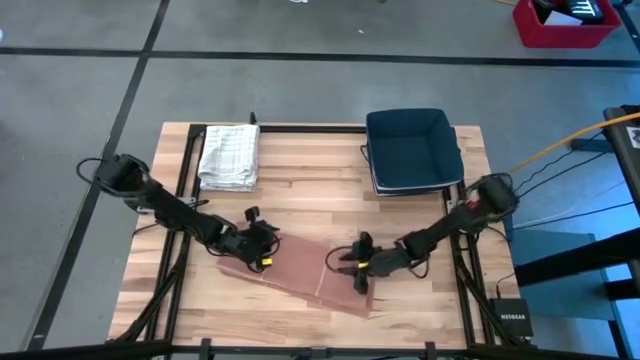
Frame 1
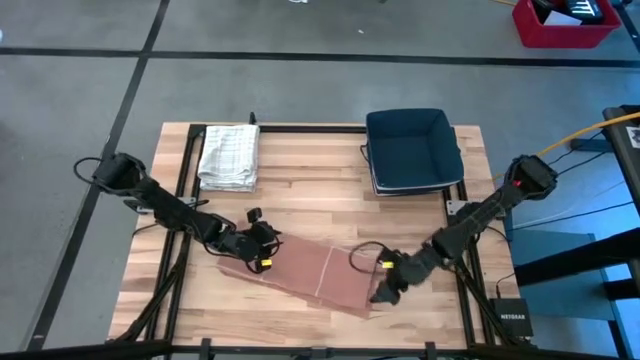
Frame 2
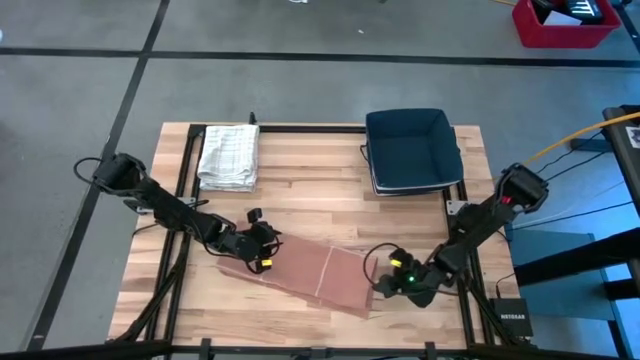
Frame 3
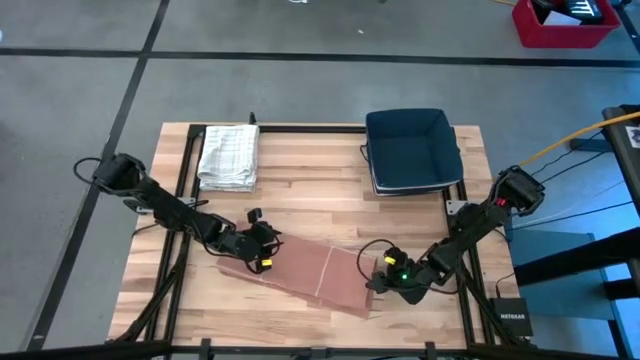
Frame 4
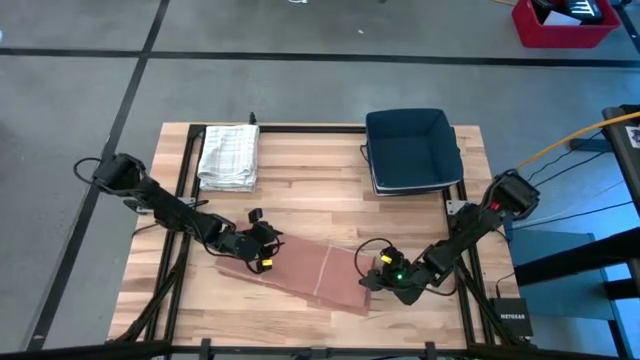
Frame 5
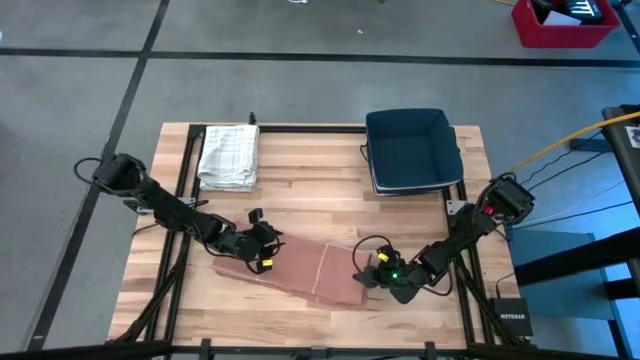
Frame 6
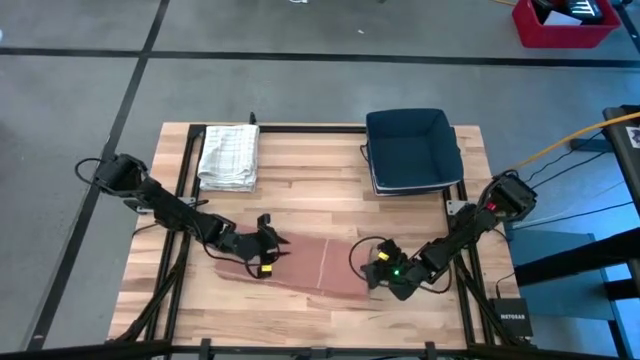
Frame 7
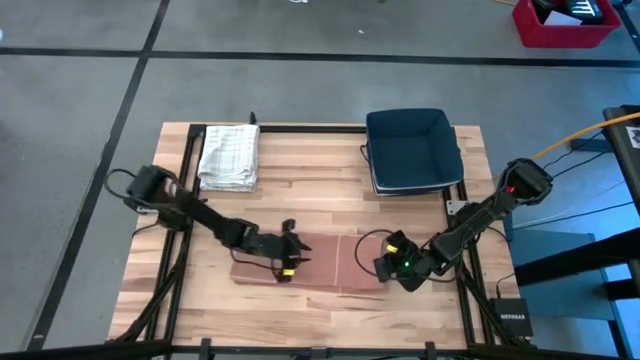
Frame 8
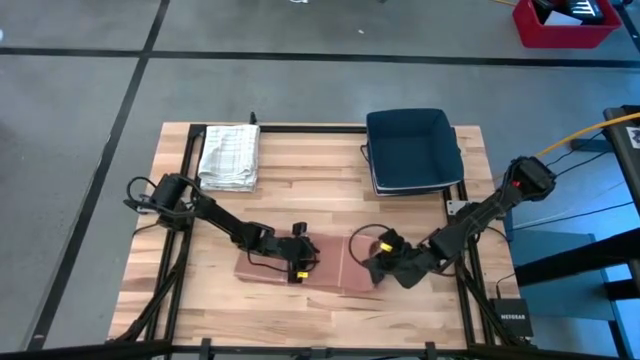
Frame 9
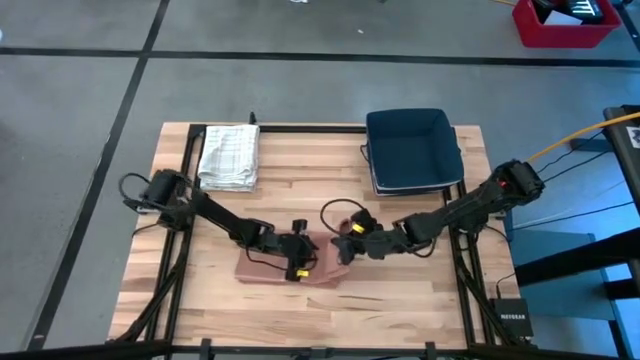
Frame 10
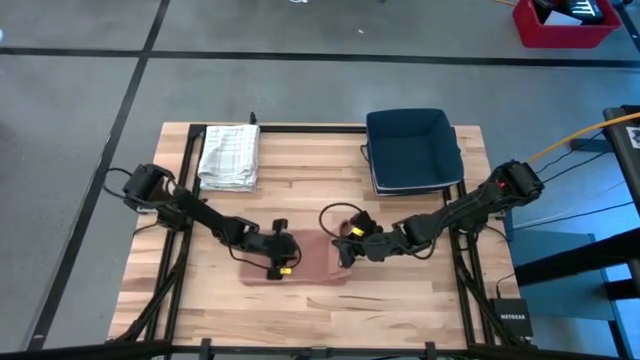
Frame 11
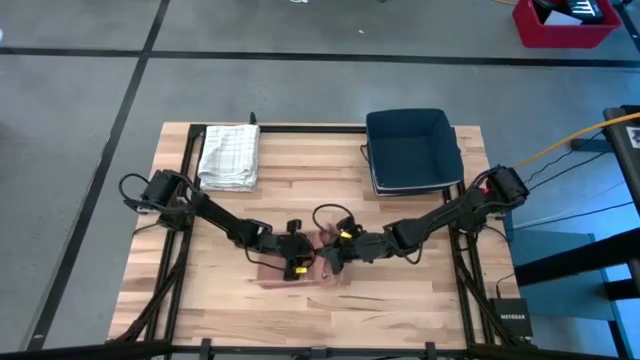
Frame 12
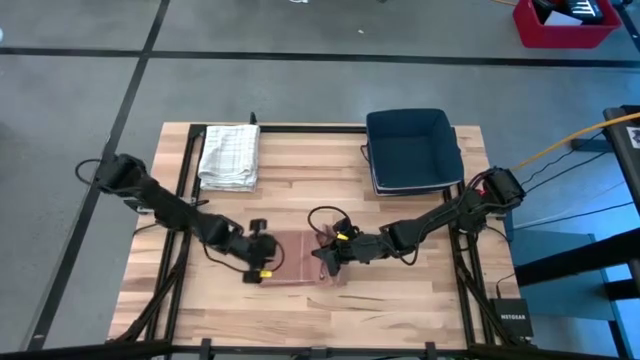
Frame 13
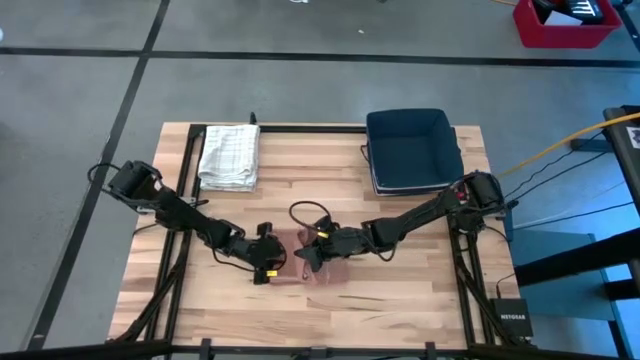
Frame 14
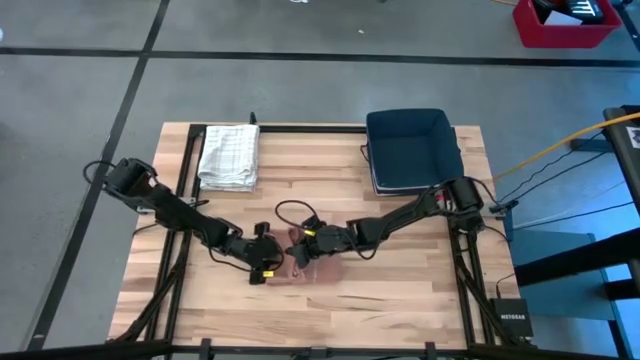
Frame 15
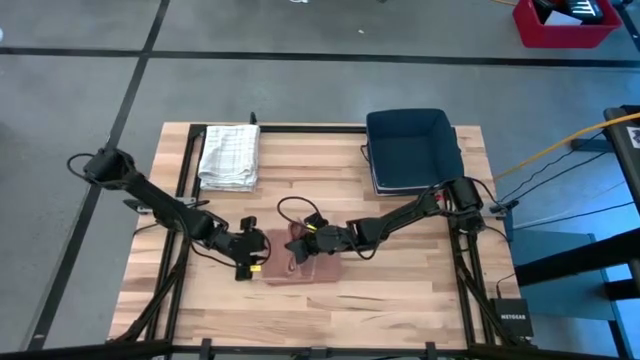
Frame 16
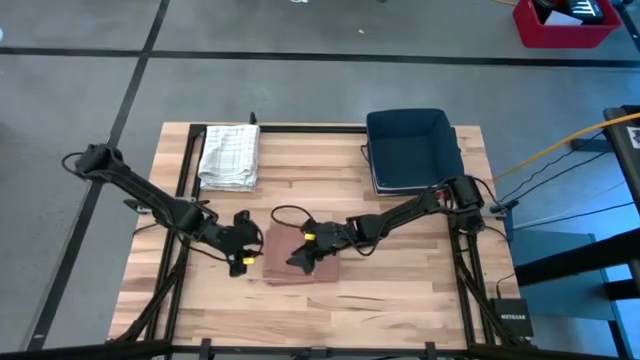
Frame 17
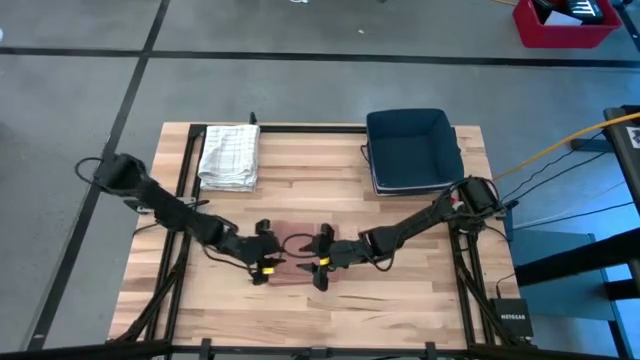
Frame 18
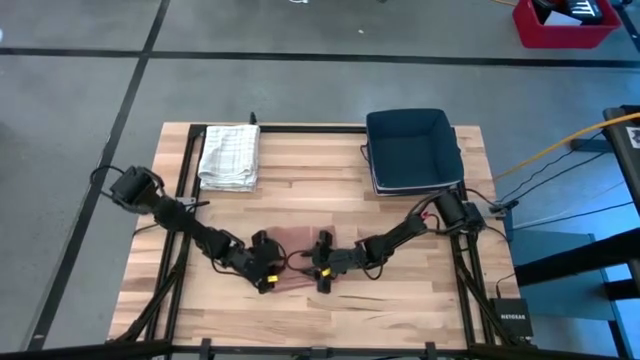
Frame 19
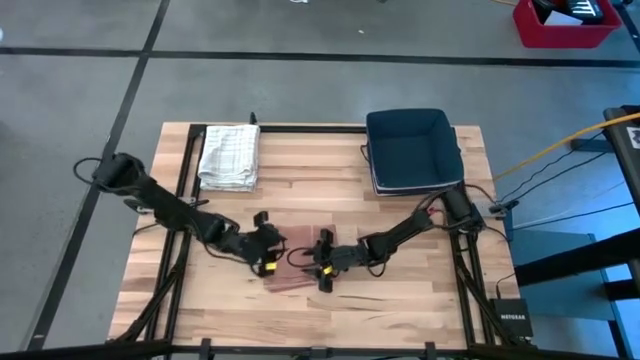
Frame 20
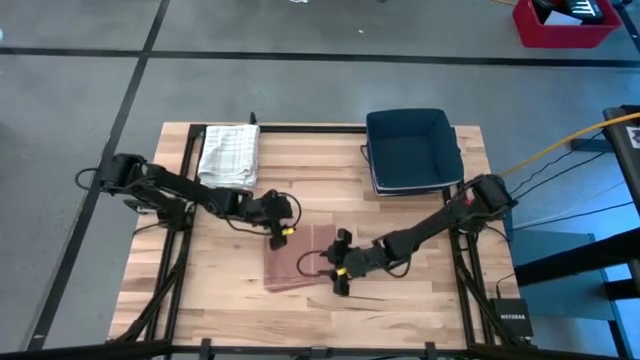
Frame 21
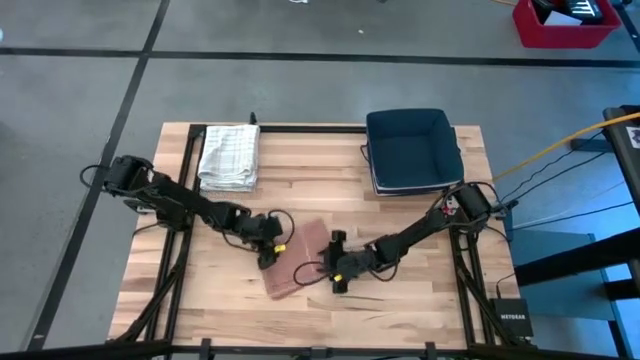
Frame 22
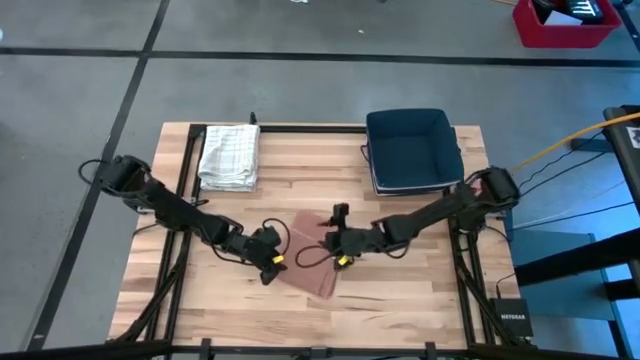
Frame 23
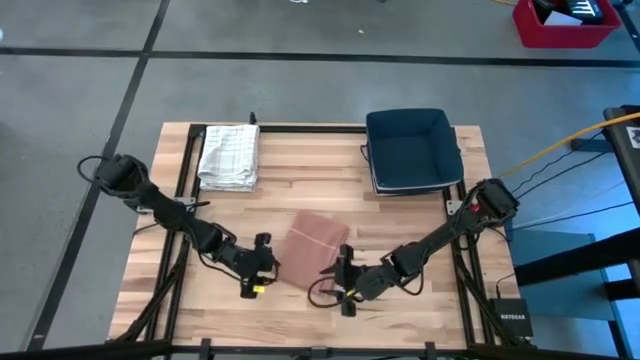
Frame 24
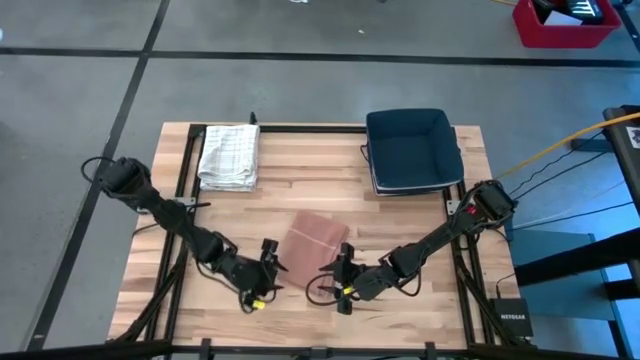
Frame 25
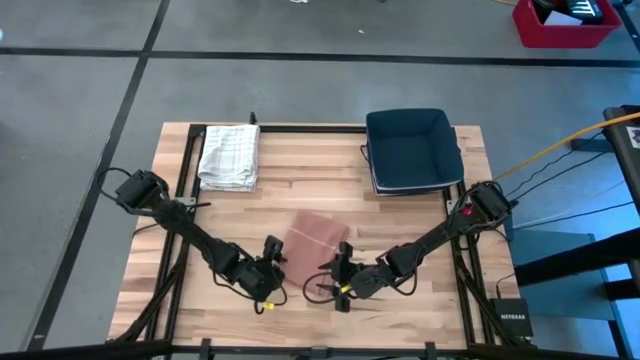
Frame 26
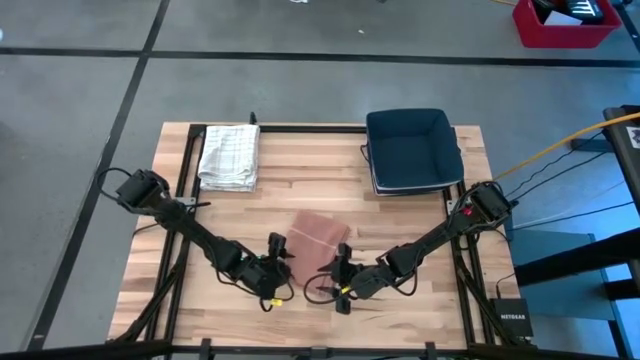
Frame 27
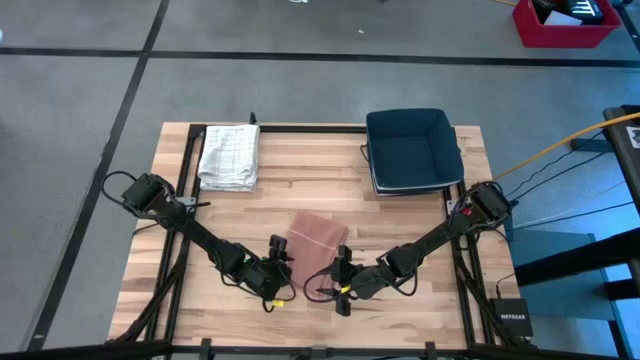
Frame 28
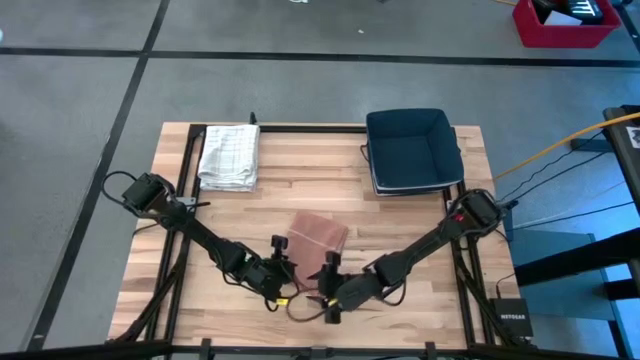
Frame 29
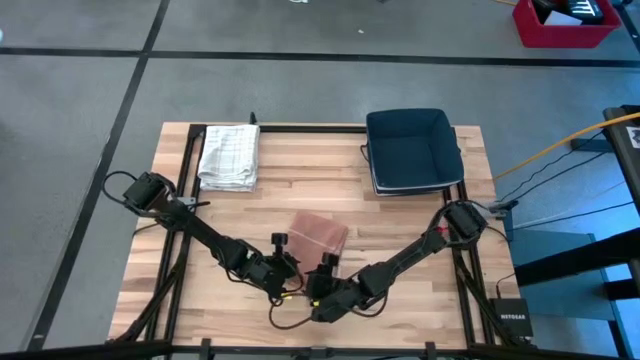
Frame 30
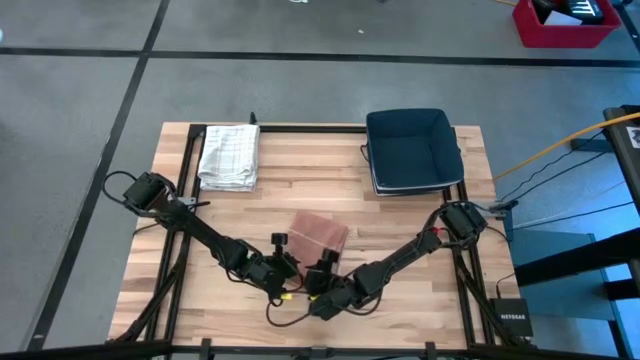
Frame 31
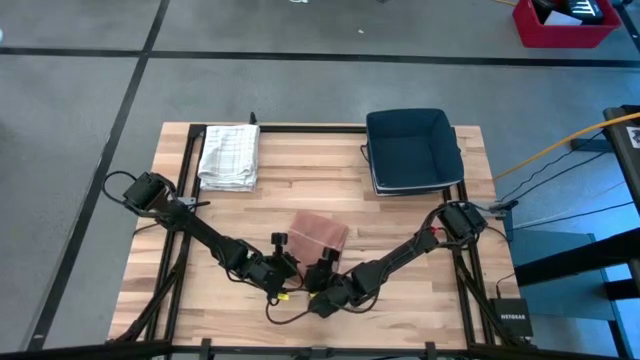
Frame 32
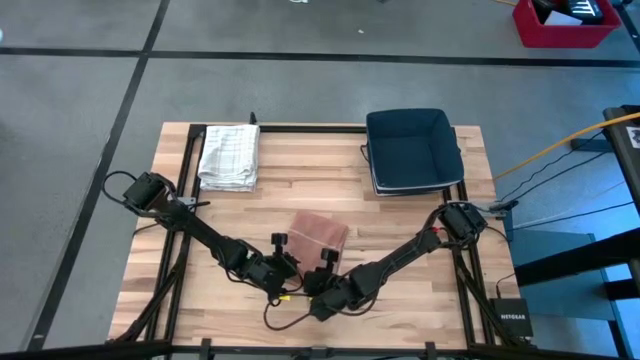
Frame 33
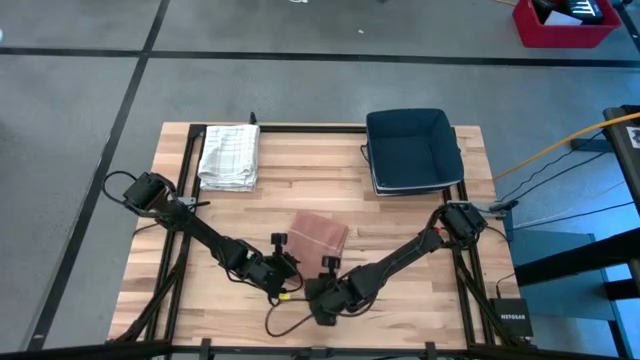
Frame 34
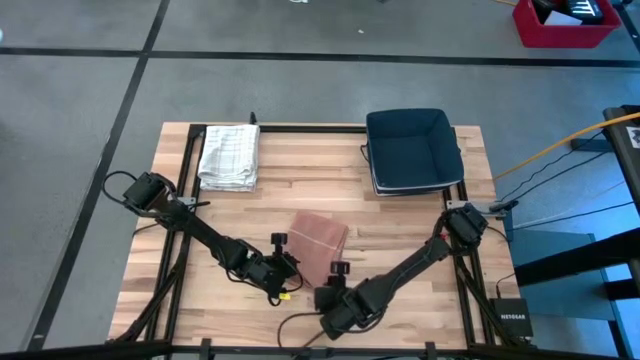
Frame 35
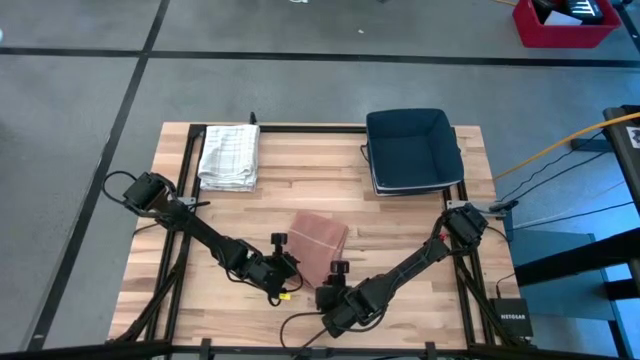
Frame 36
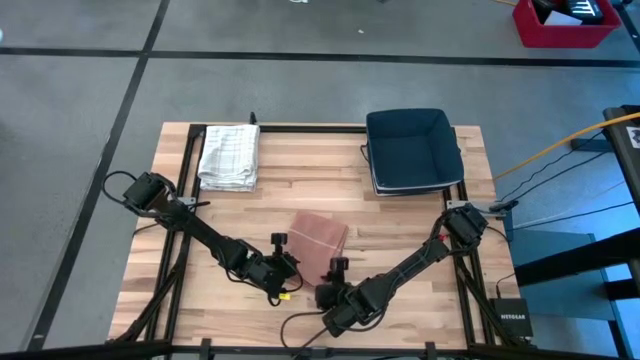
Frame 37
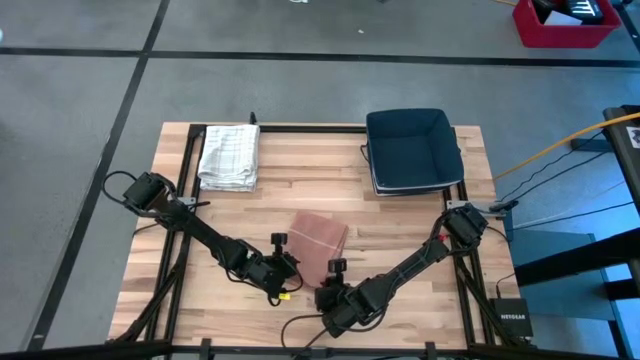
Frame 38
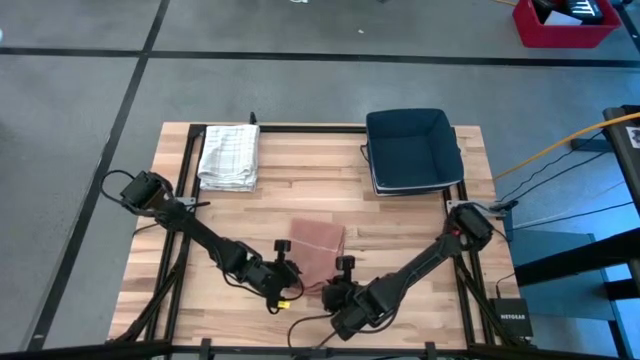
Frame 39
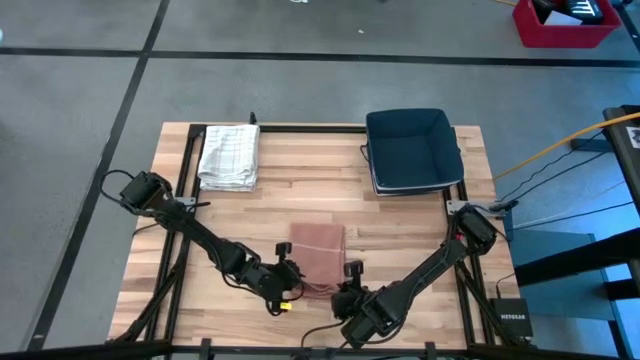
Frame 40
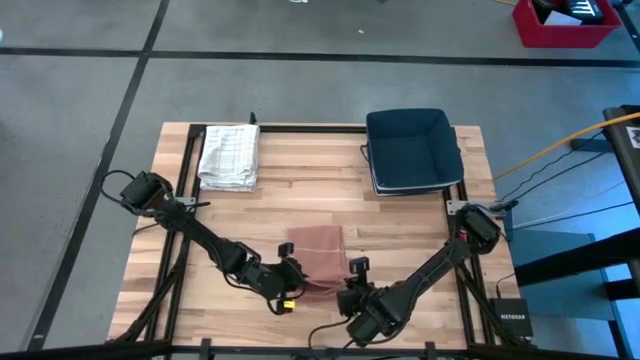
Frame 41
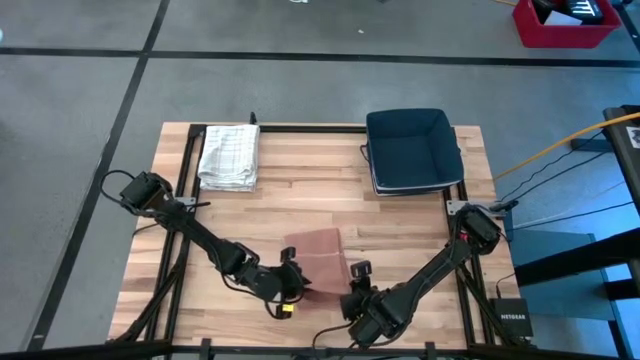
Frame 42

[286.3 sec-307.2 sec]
Task: Fold towel
Fold the brown towel on the table
